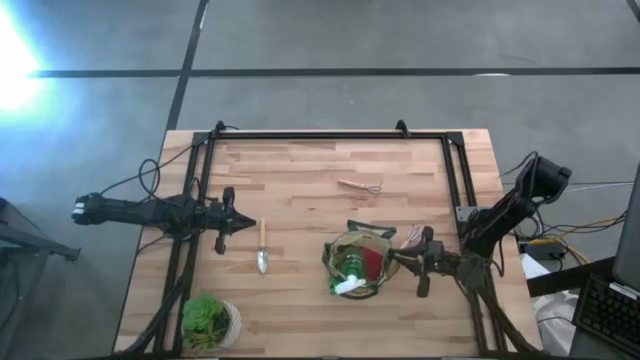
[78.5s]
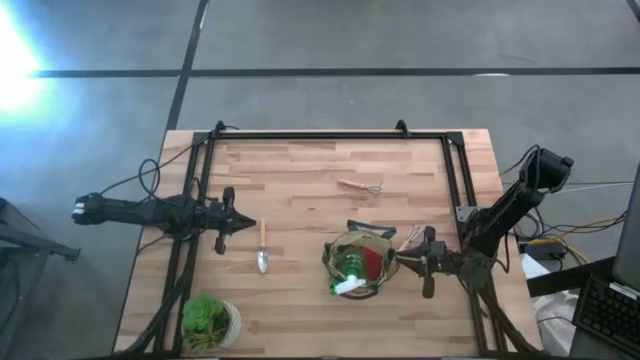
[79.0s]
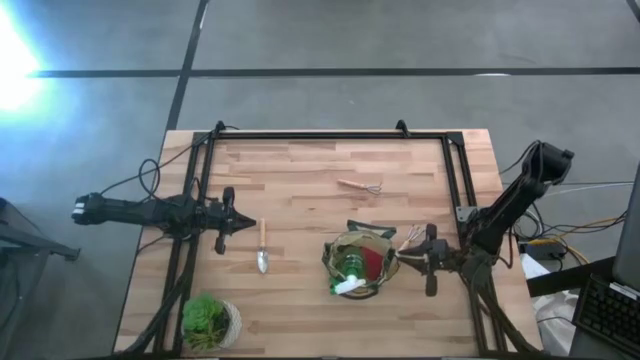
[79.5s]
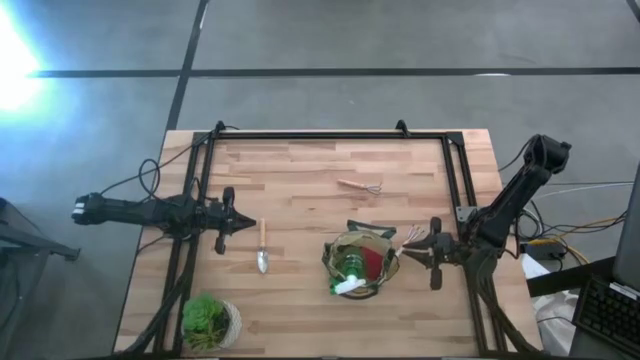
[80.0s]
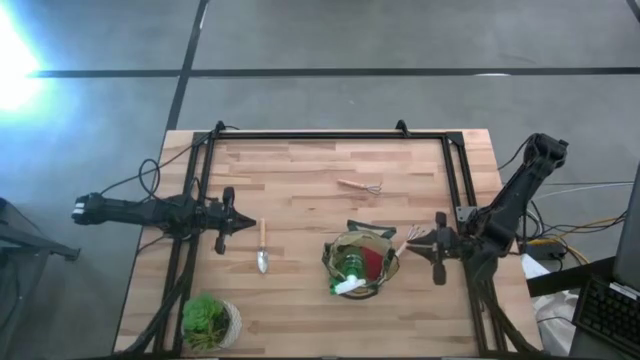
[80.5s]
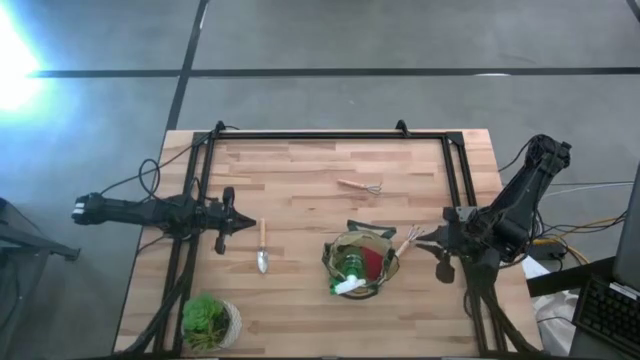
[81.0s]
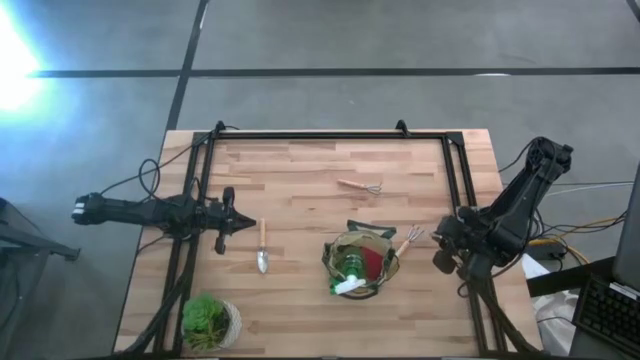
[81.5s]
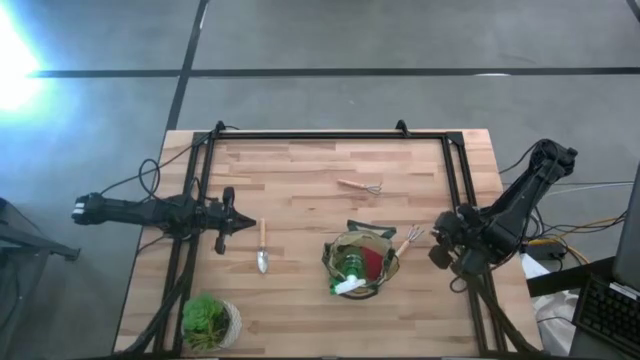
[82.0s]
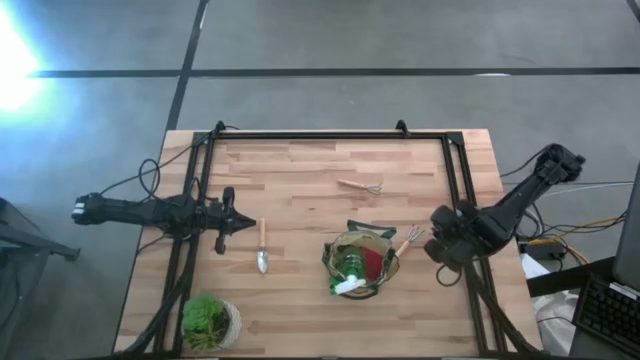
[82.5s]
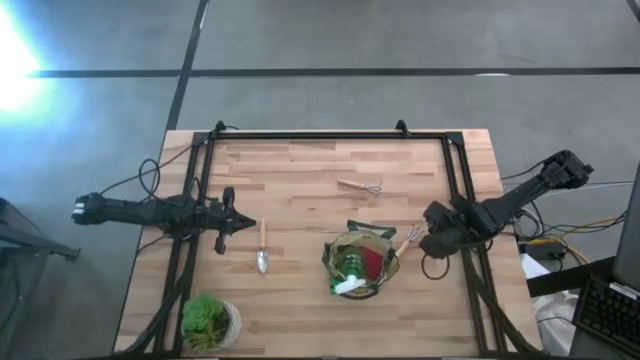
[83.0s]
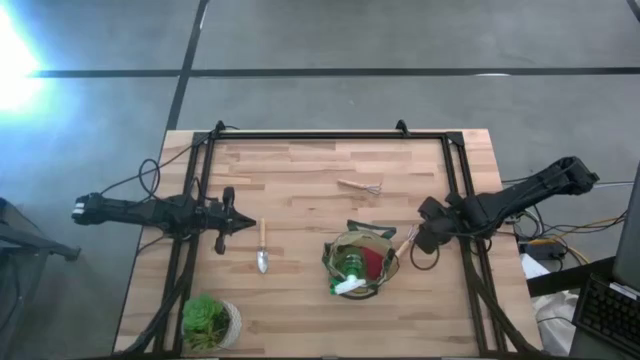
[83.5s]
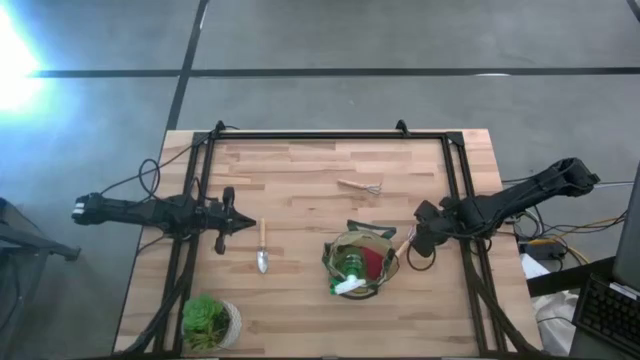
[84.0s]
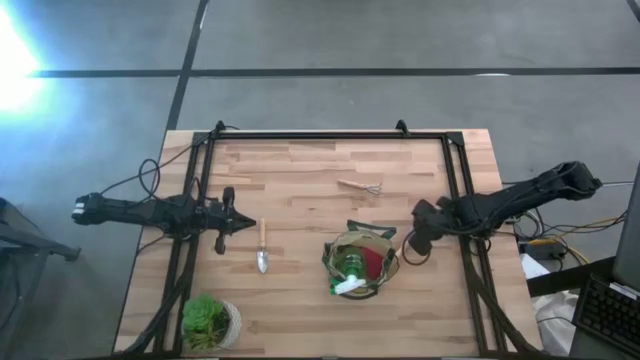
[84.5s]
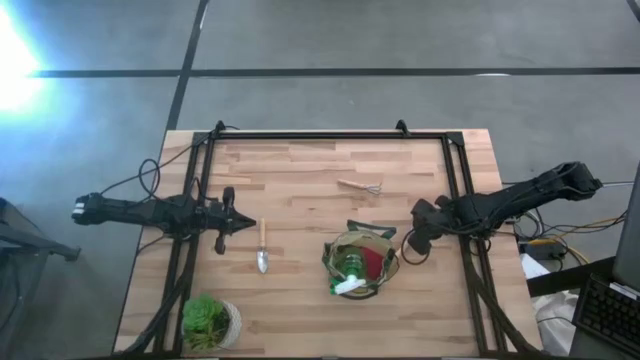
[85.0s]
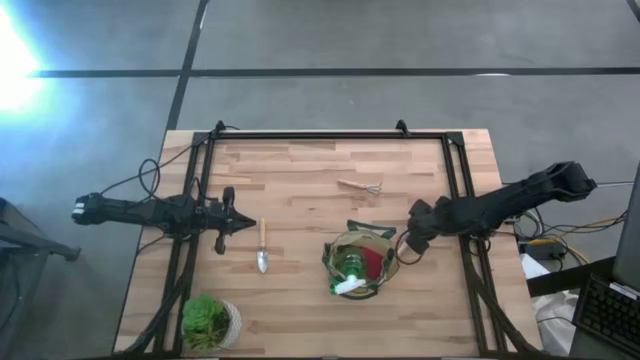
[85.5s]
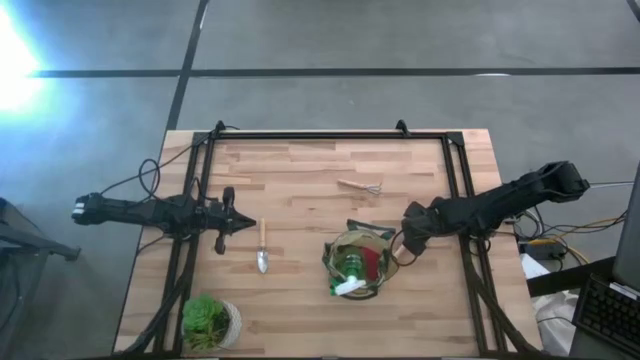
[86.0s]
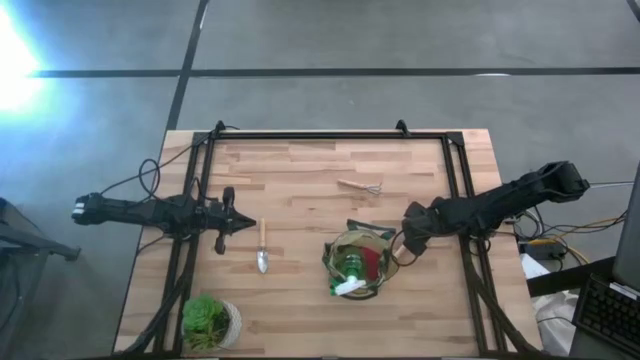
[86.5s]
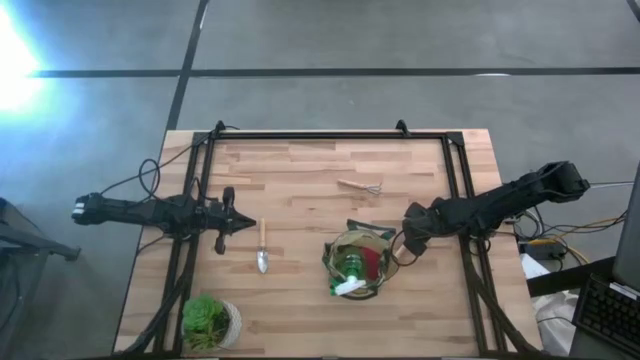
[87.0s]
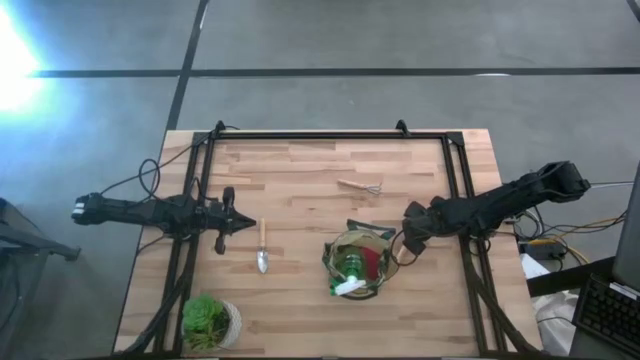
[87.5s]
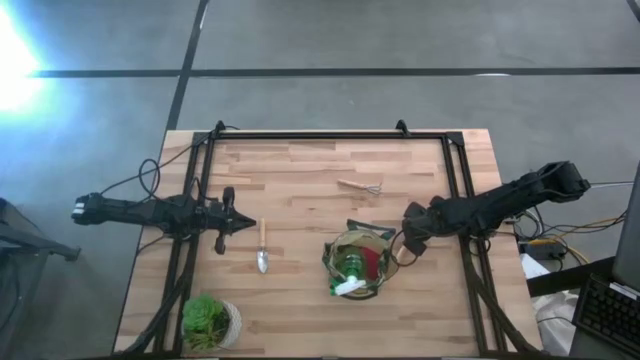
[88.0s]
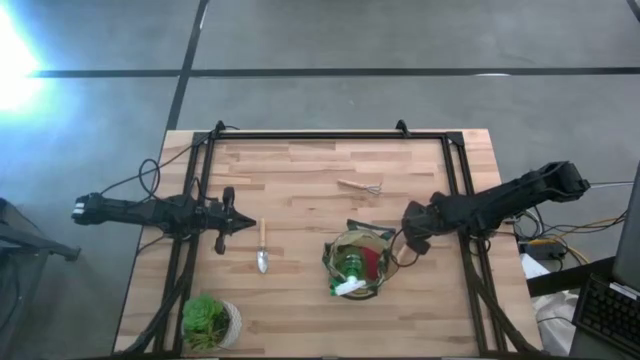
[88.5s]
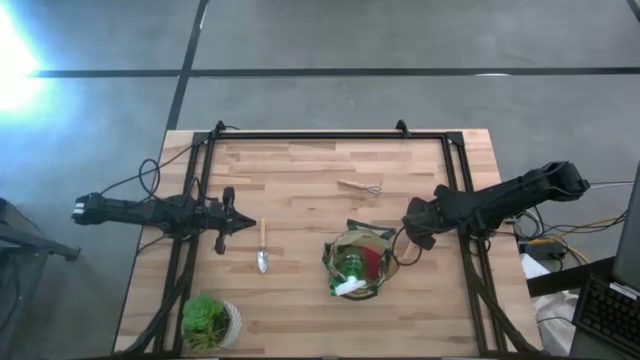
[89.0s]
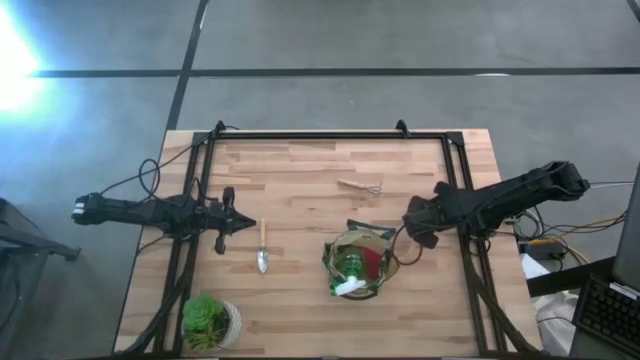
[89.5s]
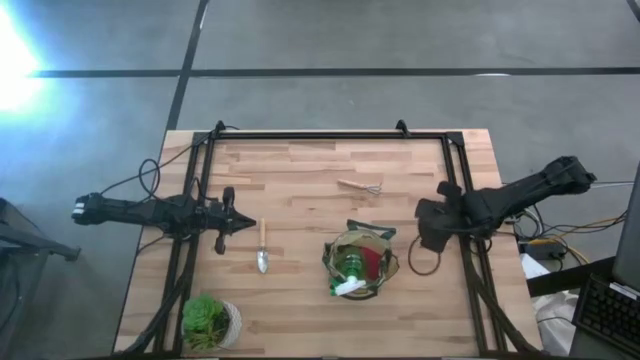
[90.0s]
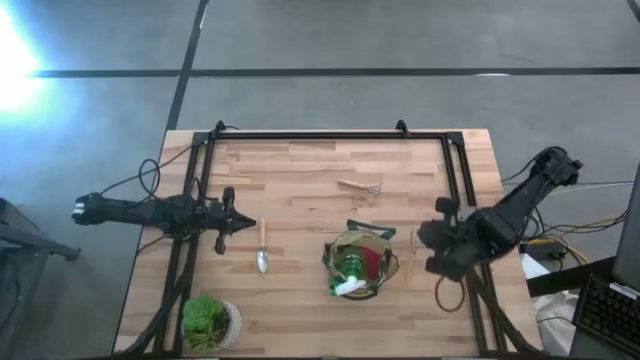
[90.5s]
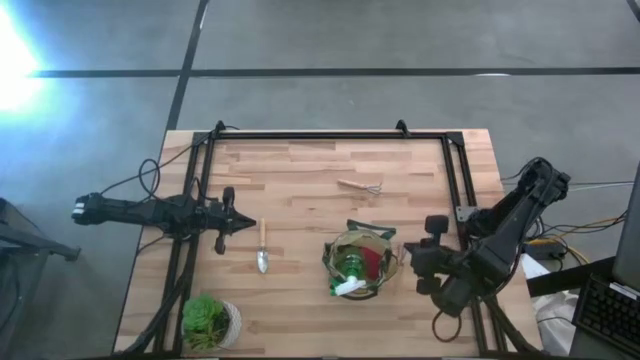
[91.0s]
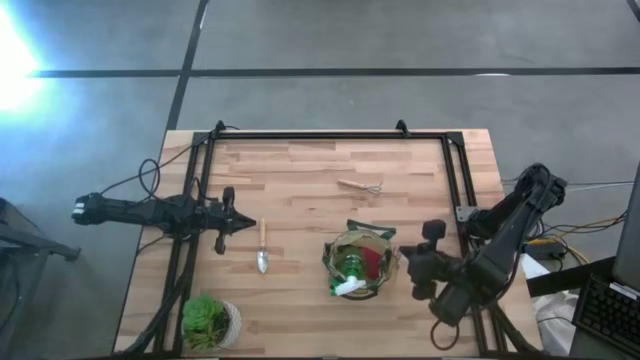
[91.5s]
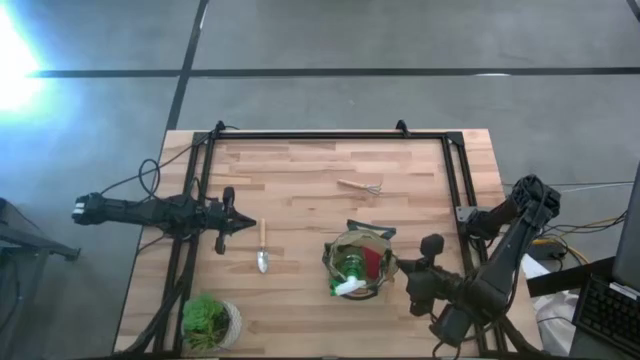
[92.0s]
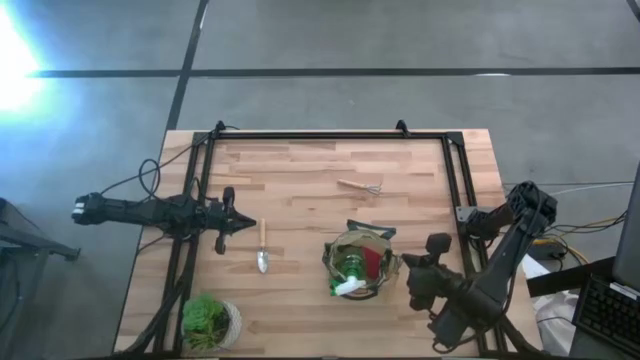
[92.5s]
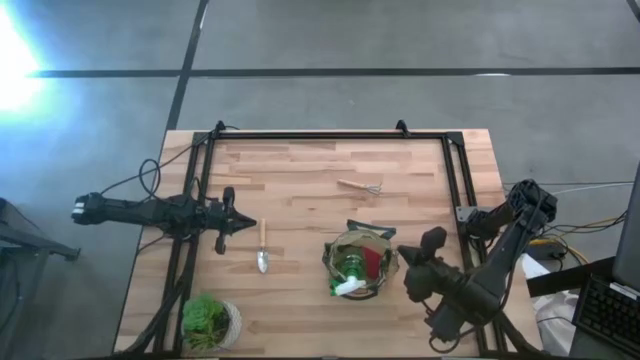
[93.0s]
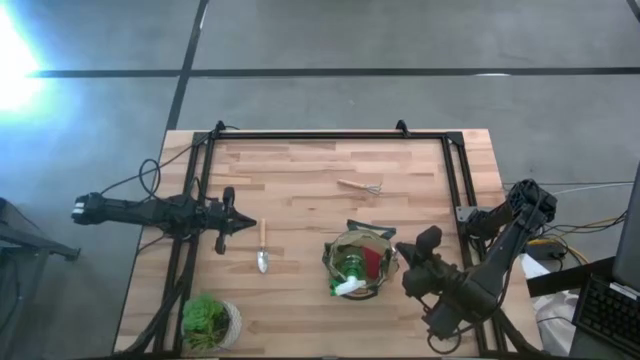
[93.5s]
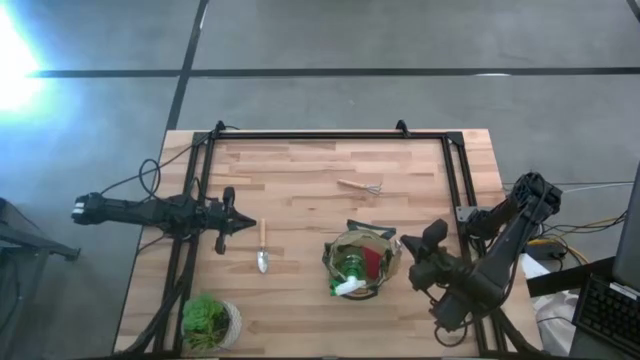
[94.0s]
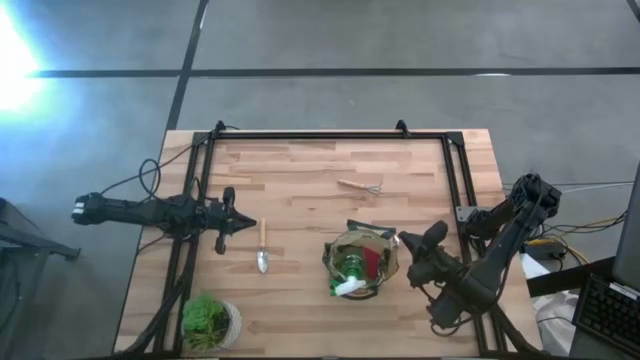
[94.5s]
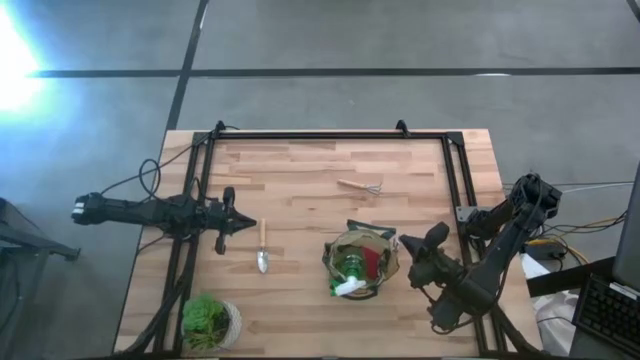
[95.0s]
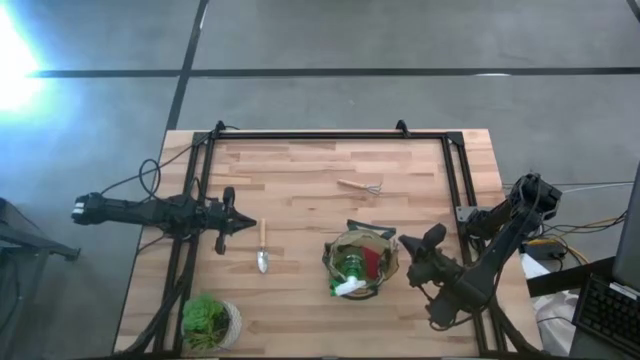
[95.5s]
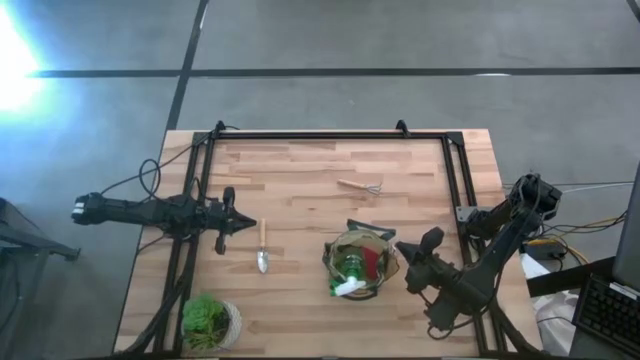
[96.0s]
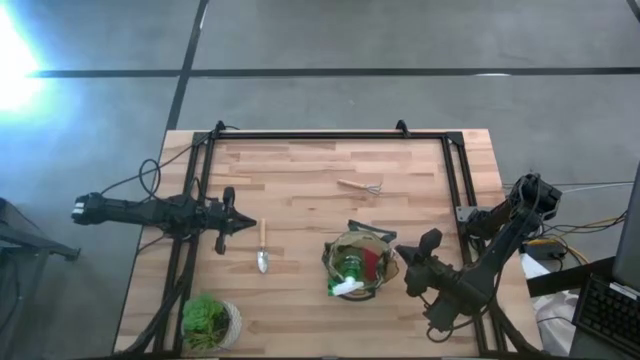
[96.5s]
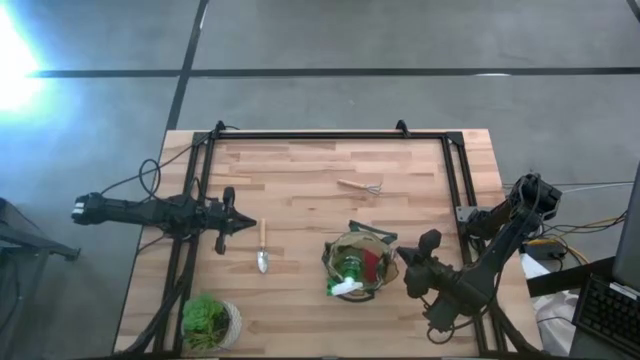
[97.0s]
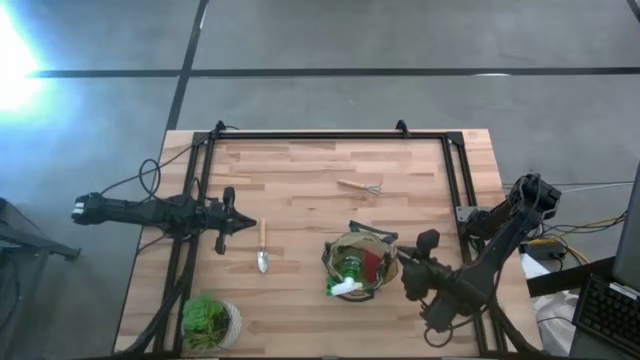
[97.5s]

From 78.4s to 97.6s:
Task: Pick & Place Garden tools in Gardening bag
Put the bottom hand rake into the side pocket of the gardening bag
